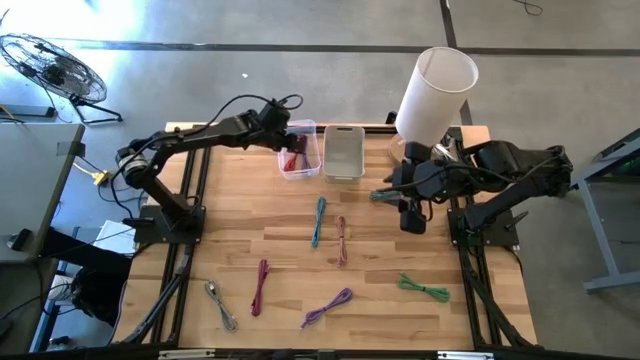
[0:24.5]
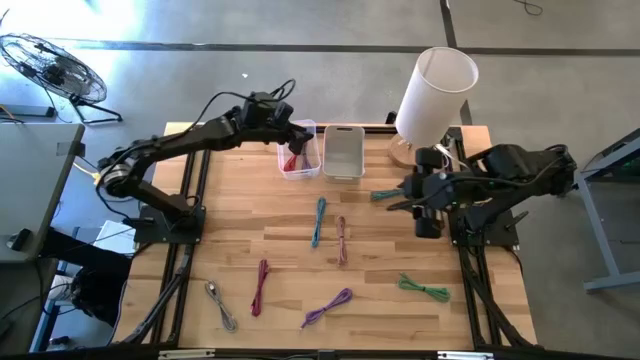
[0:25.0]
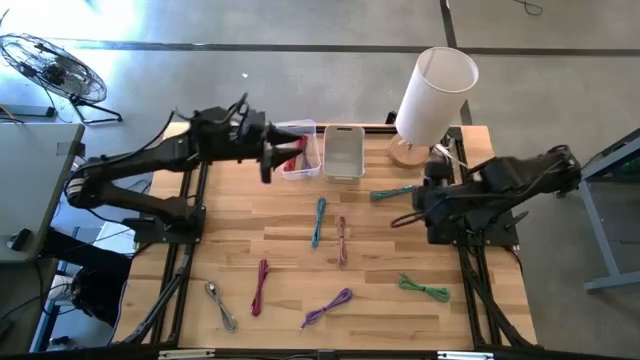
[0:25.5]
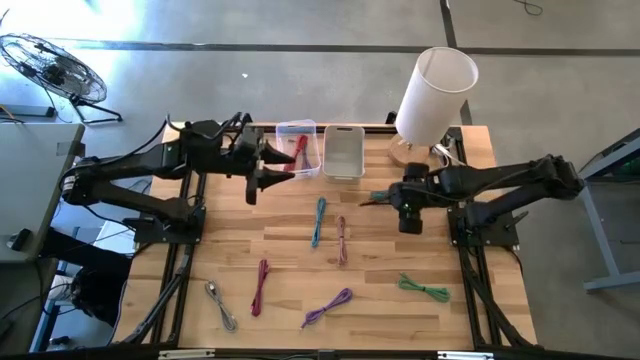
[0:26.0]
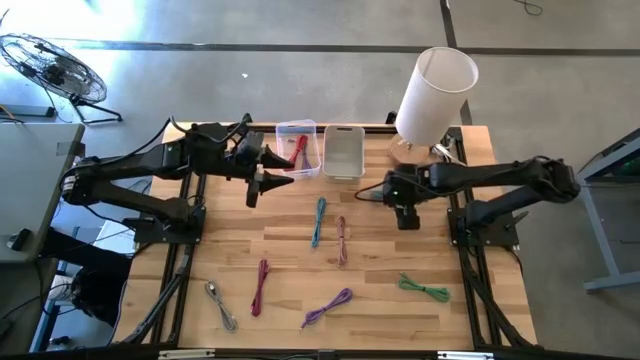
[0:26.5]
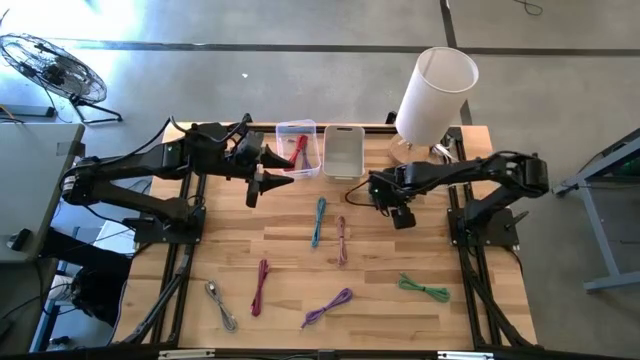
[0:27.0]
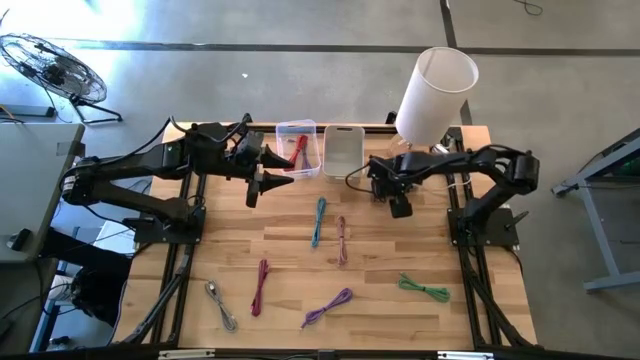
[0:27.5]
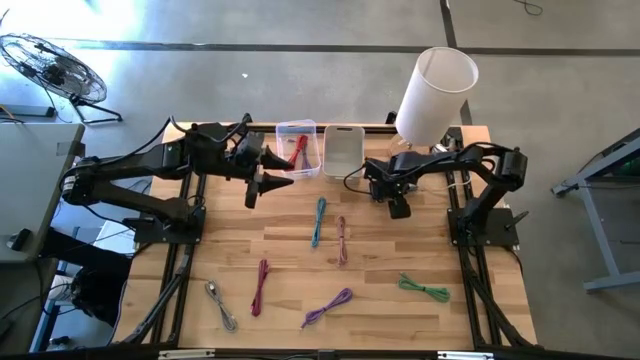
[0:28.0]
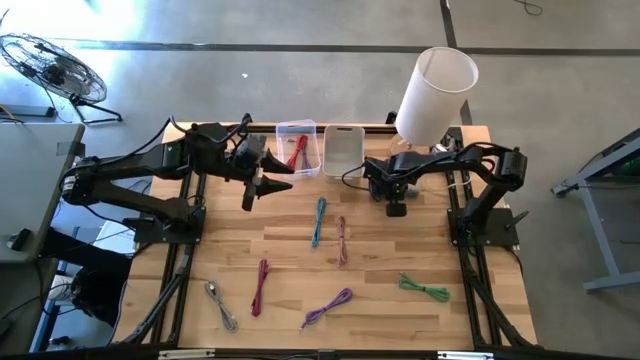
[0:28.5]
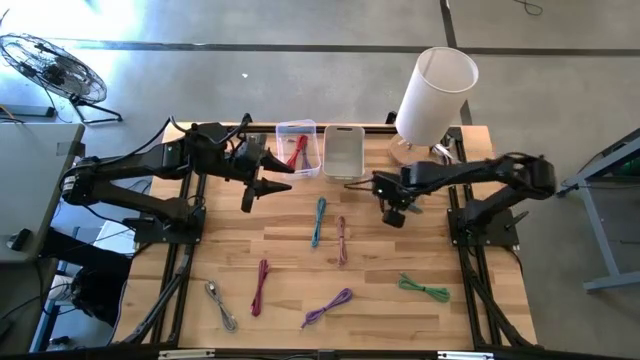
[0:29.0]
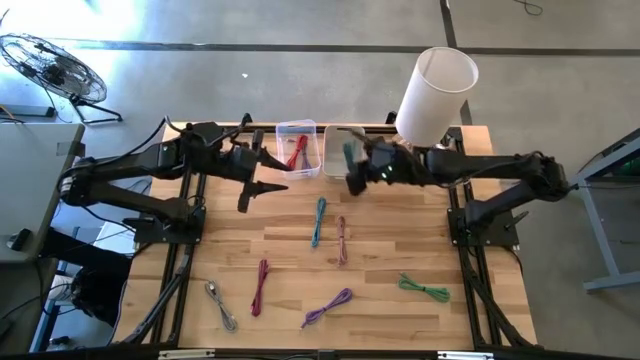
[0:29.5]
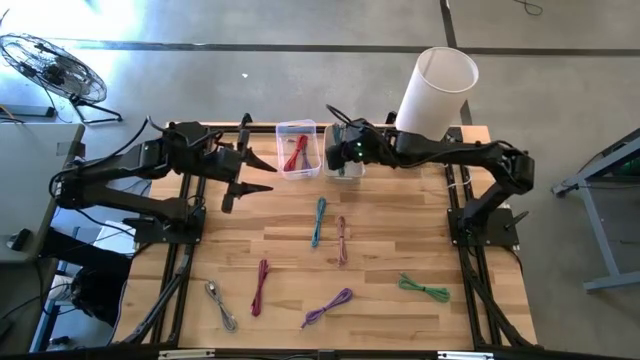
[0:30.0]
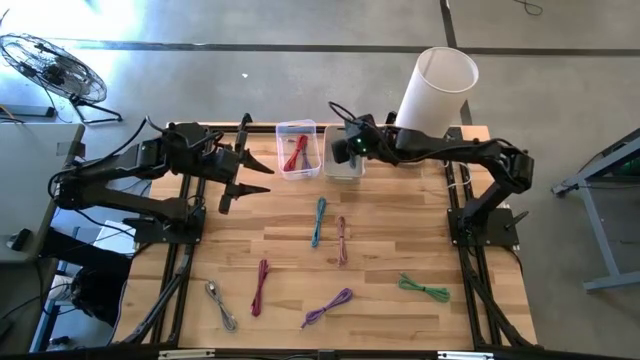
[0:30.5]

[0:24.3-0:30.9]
Task: Pick & Place USB Port
Put the right blue cable into the gray bin

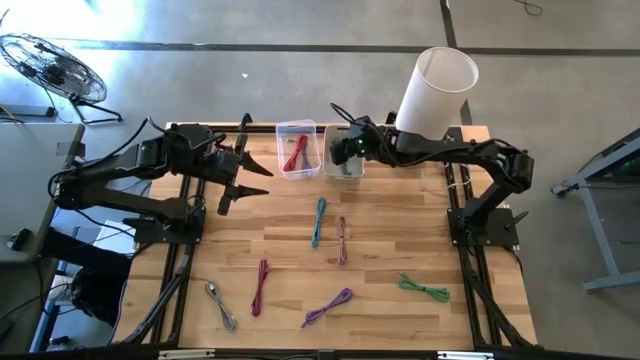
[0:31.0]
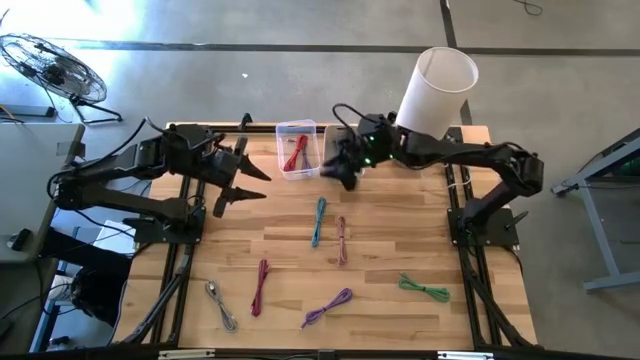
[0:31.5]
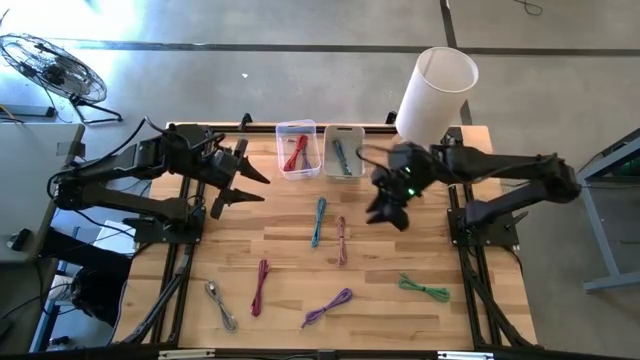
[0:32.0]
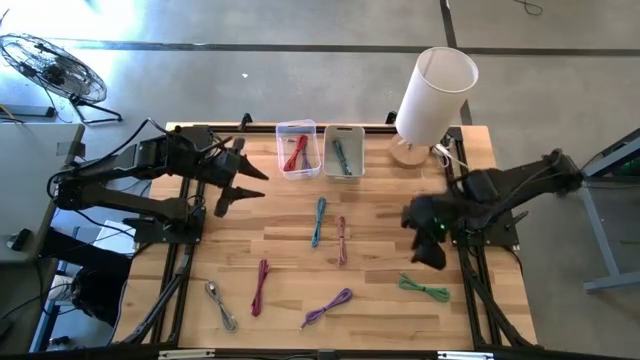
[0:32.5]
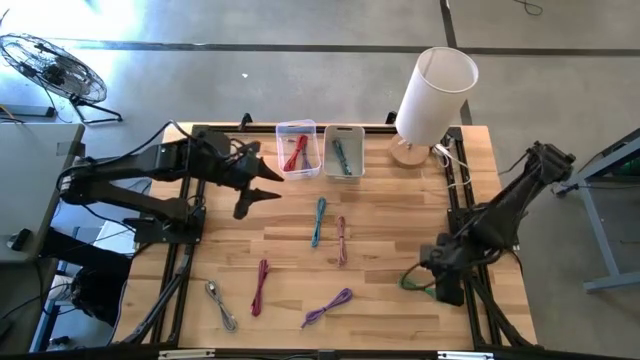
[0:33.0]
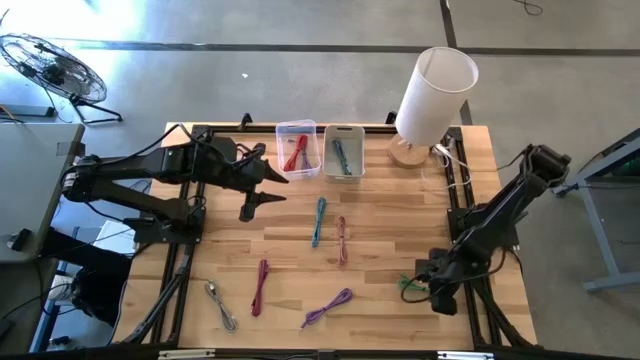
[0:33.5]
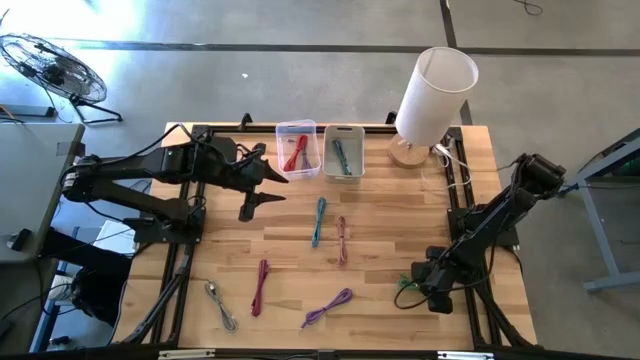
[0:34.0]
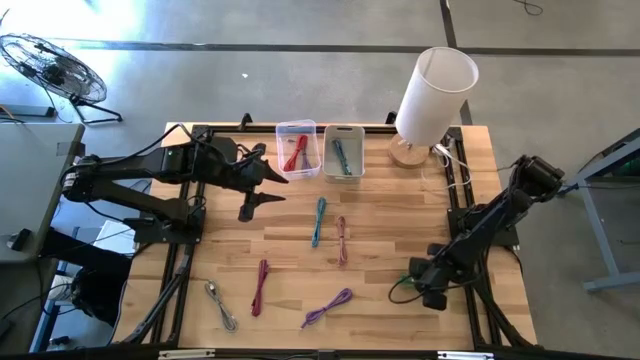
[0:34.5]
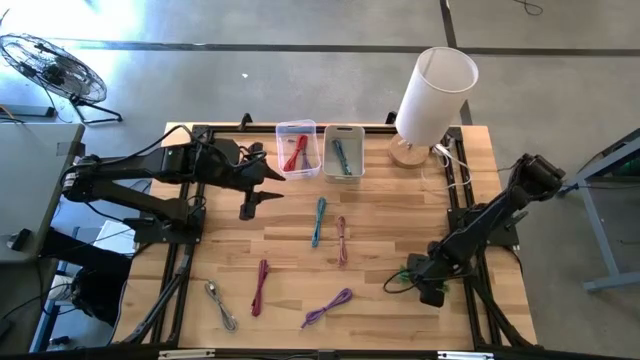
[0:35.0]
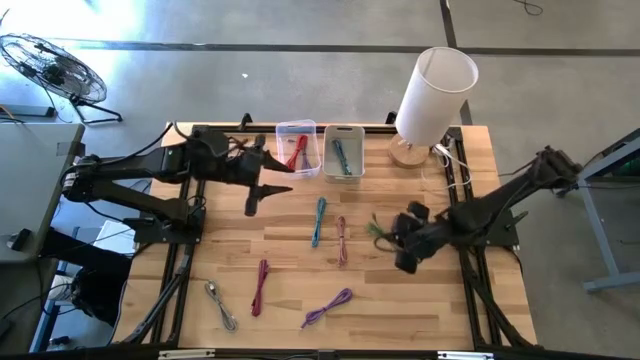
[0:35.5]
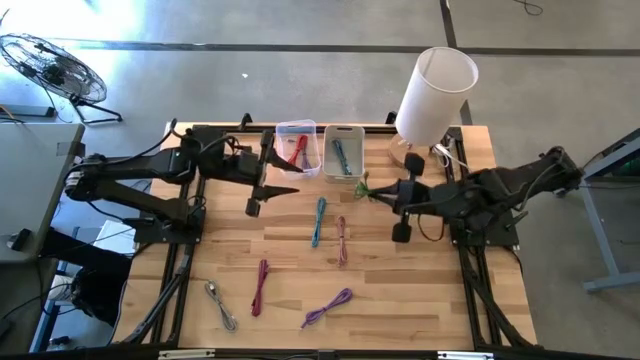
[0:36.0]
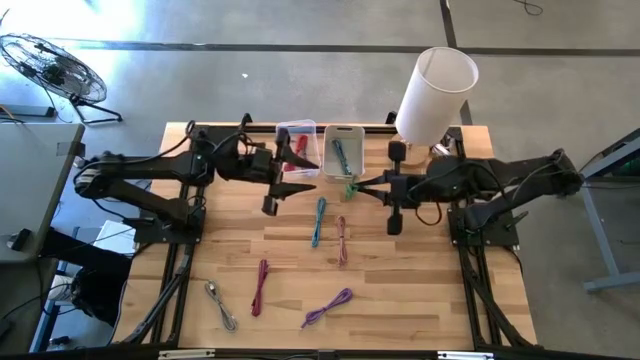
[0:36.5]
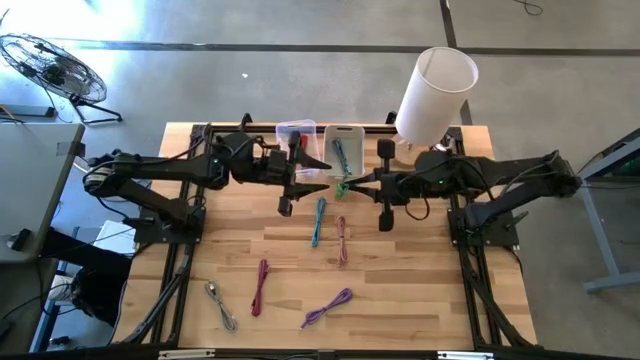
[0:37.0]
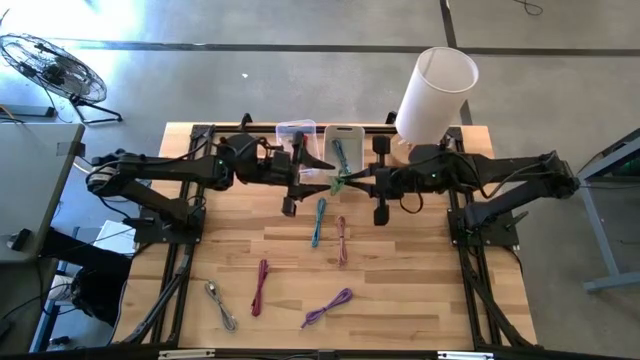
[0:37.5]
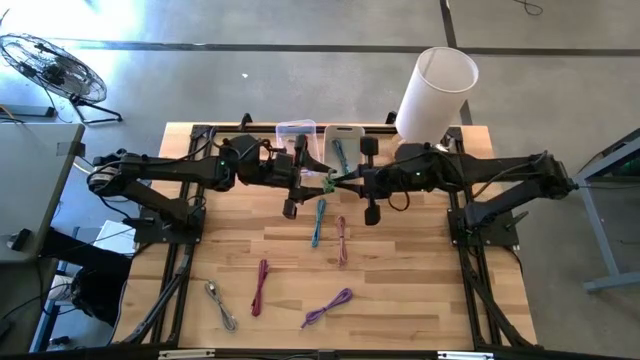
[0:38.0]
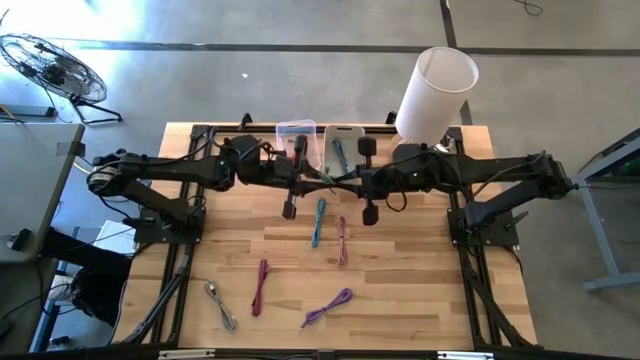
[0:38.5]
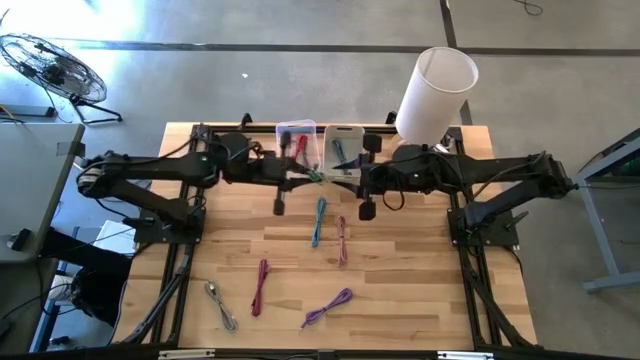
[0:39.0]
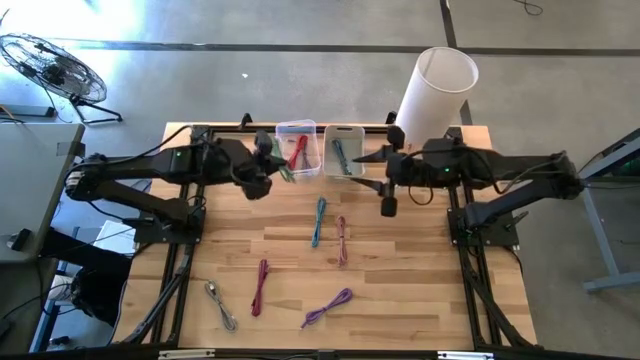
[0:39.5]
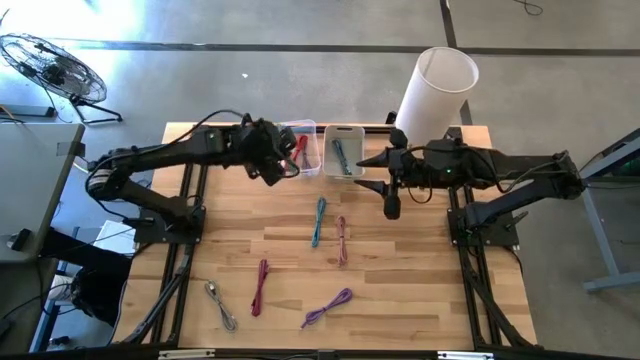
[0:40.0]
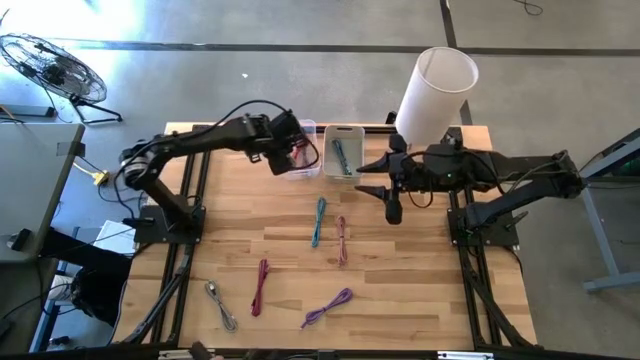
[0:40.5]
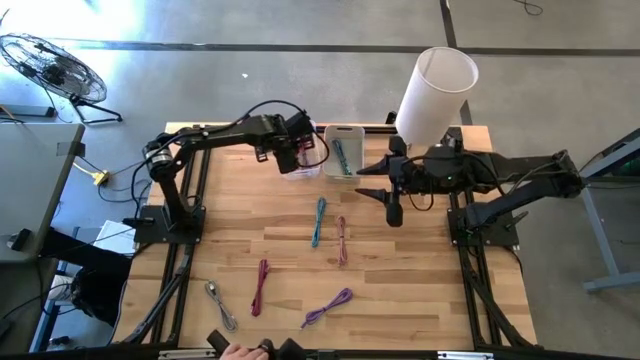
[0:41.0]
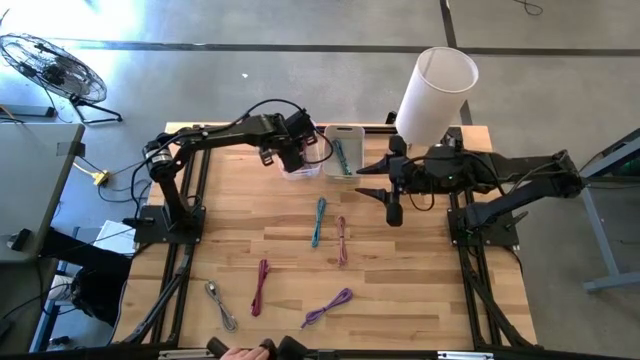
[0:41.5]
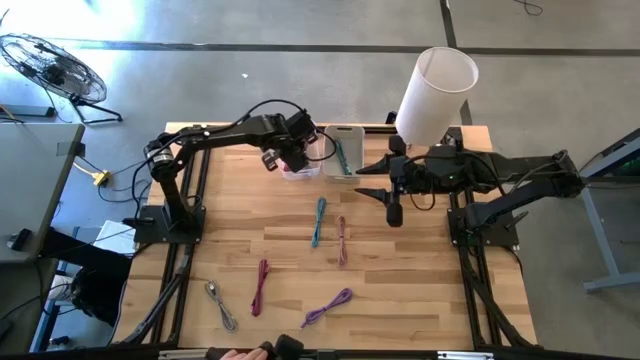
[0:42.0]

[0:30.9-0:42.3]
Put the green cable into the transparent bin

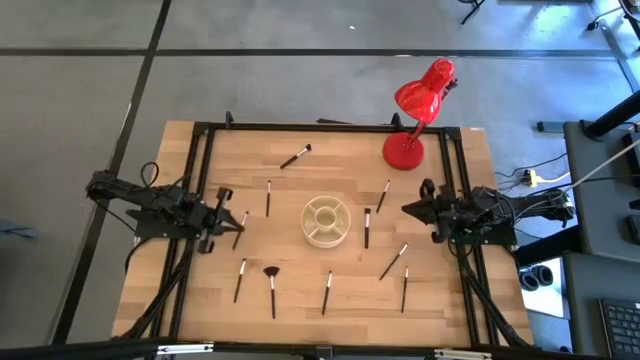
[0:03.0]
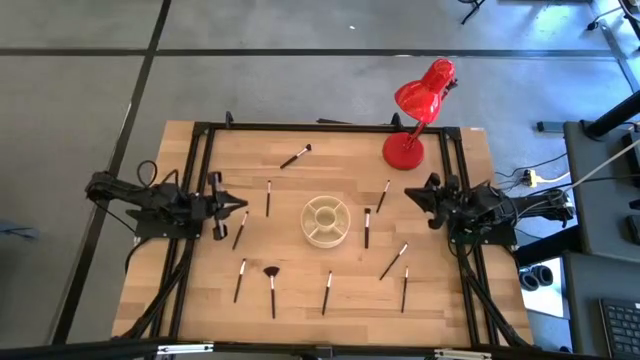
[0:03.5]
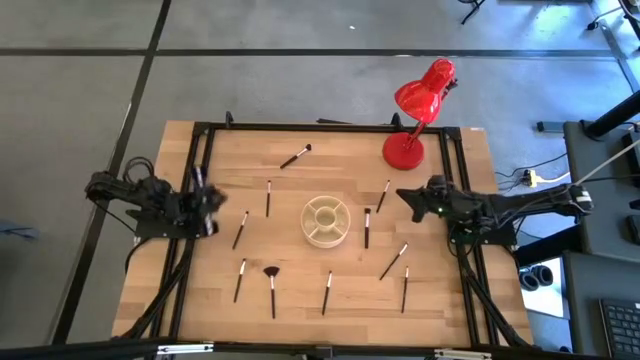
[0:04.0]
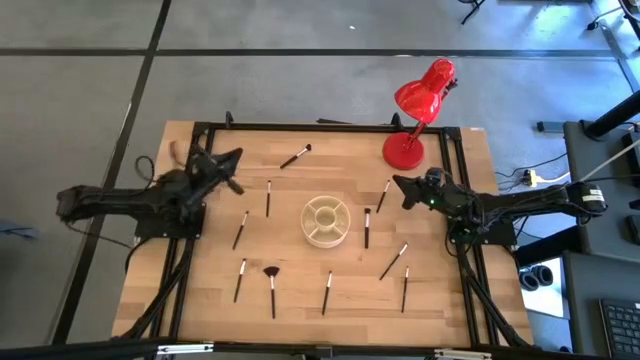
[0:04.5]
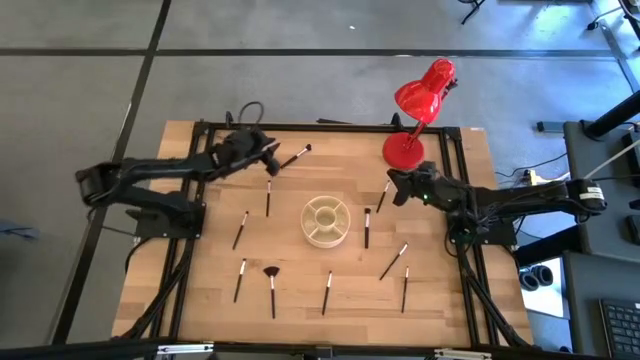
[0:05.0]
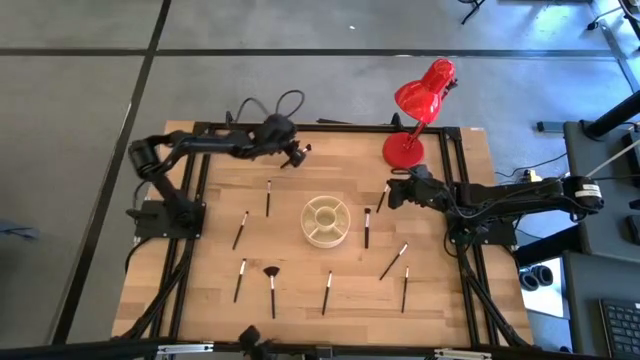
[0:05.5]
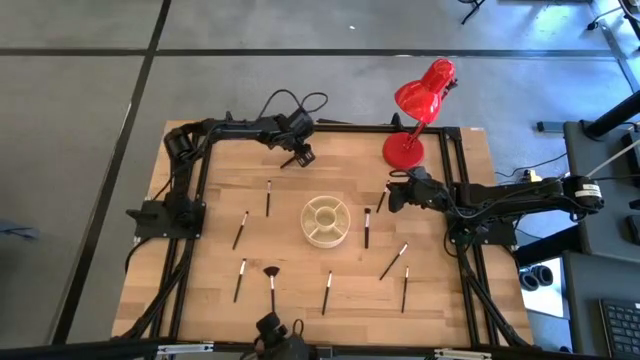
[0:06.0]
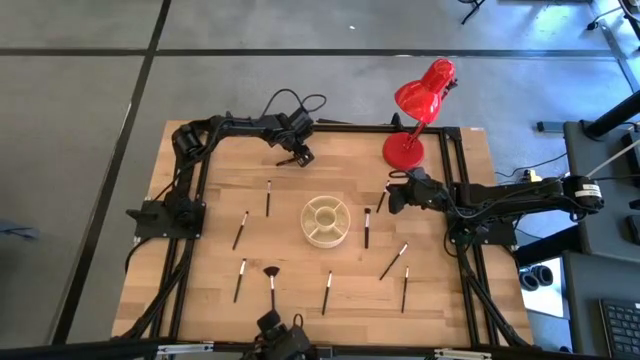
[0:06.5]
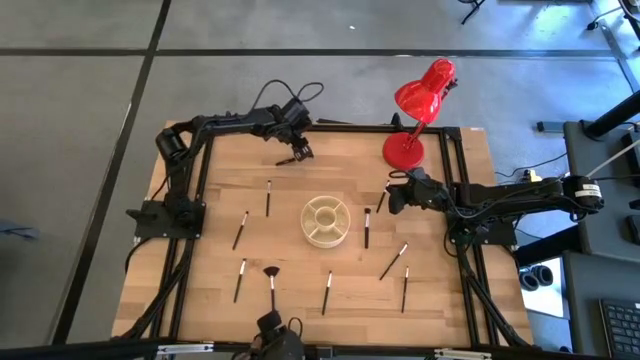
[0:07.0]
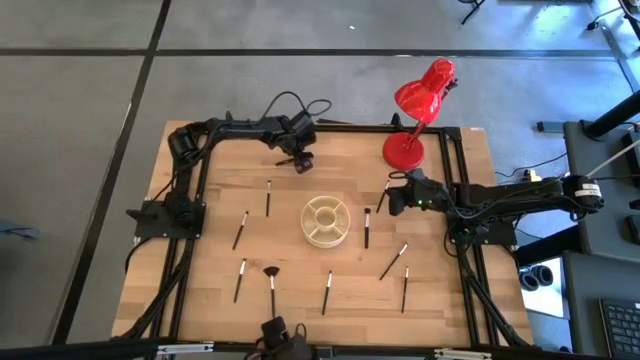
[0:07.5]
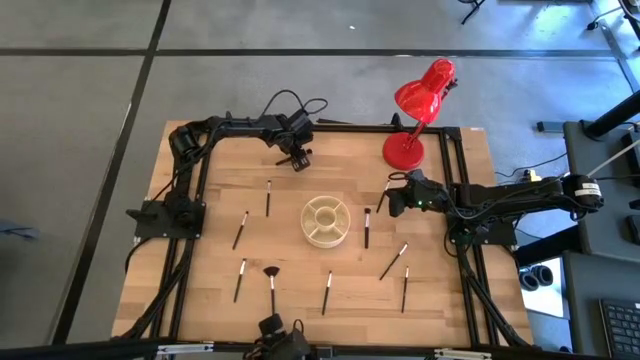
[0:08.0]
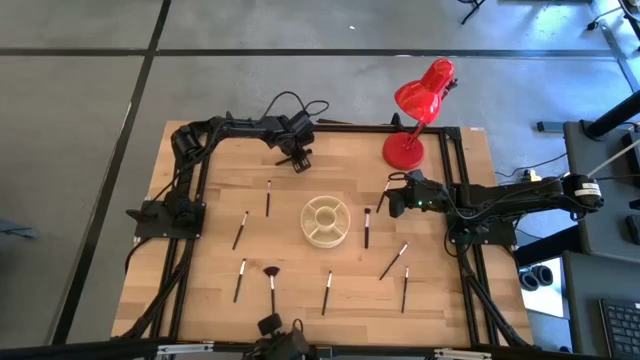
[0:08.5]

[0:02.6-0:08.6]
Task: Put items in baskets/containers
Put the black powder brush into the white brush holder
